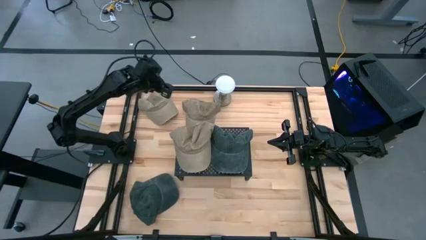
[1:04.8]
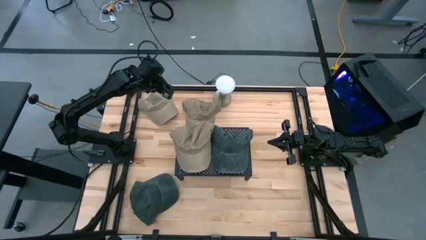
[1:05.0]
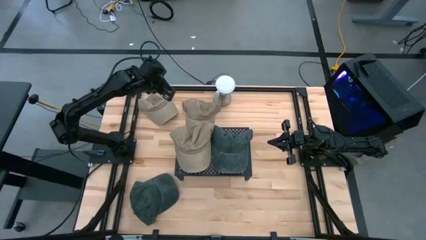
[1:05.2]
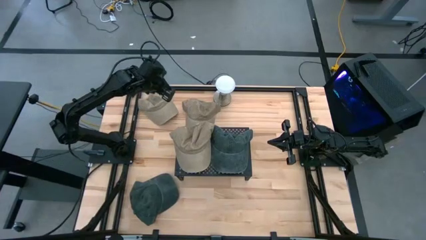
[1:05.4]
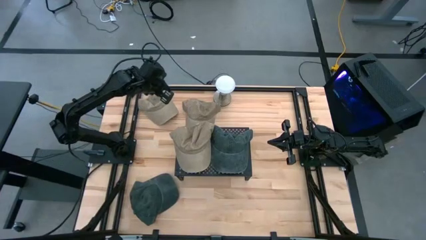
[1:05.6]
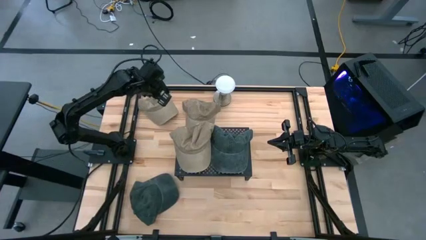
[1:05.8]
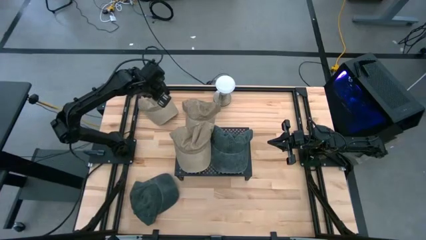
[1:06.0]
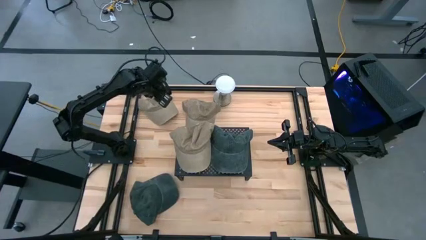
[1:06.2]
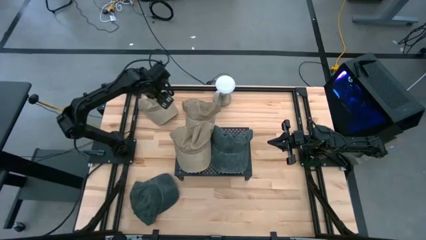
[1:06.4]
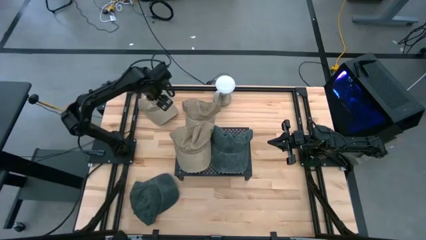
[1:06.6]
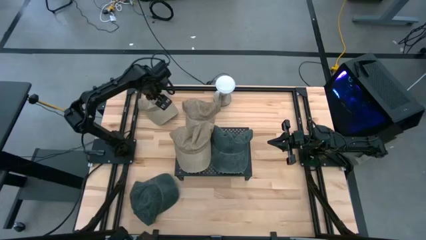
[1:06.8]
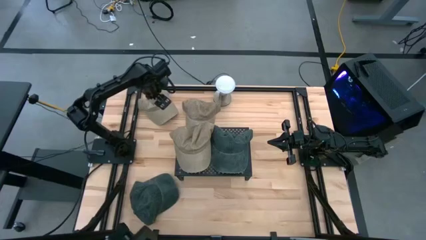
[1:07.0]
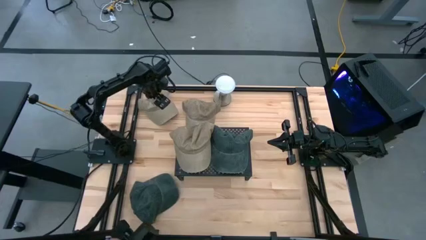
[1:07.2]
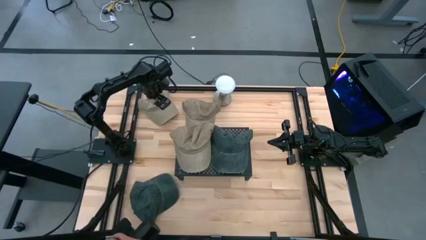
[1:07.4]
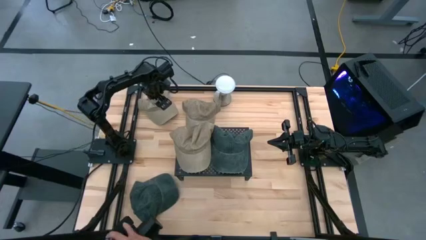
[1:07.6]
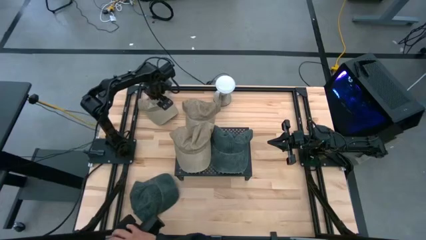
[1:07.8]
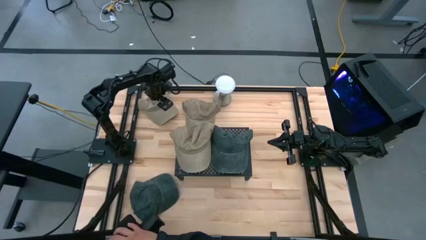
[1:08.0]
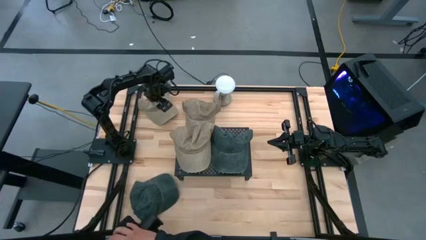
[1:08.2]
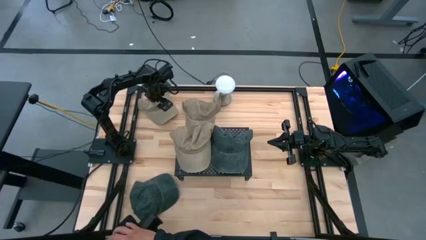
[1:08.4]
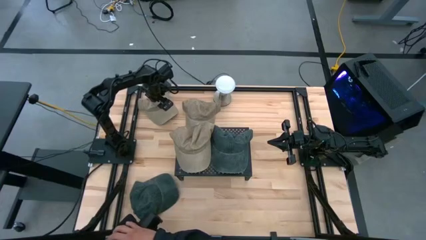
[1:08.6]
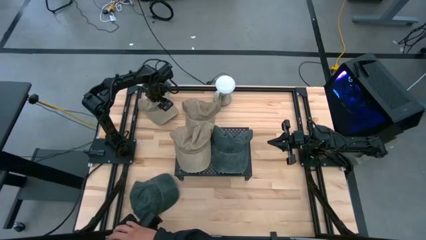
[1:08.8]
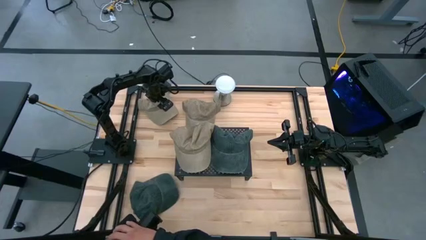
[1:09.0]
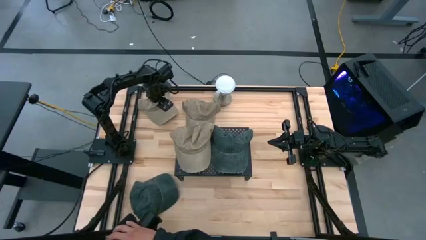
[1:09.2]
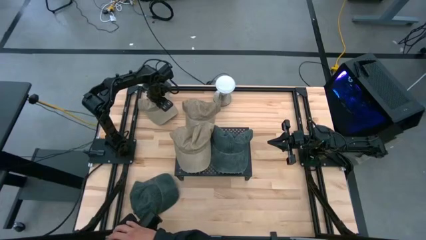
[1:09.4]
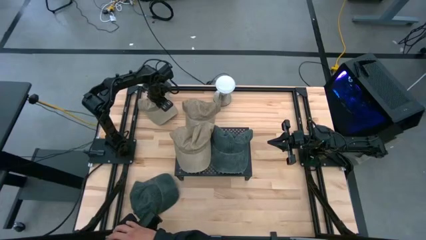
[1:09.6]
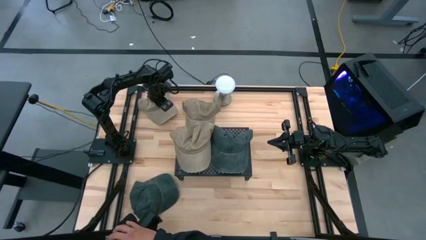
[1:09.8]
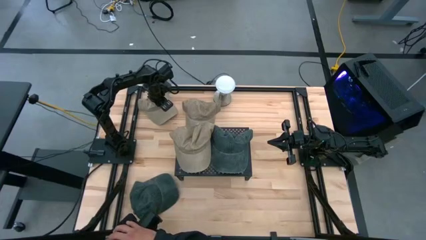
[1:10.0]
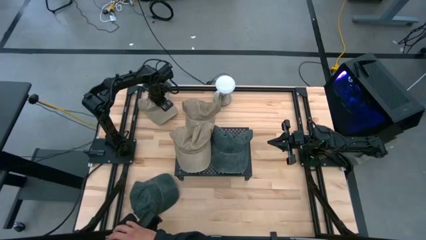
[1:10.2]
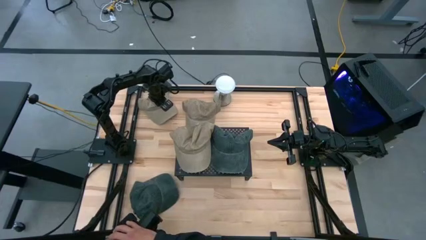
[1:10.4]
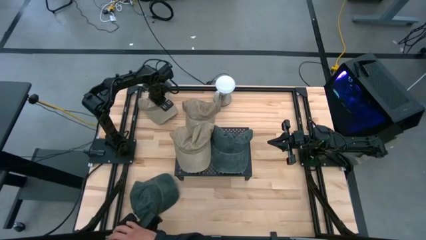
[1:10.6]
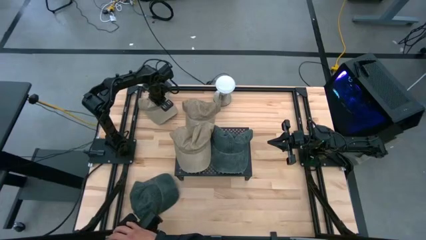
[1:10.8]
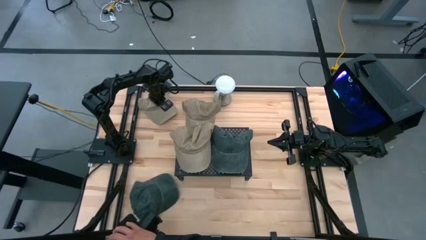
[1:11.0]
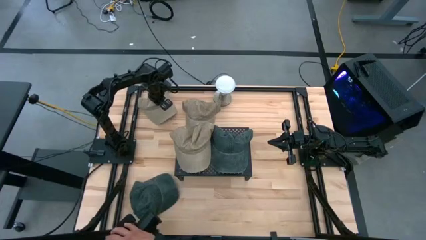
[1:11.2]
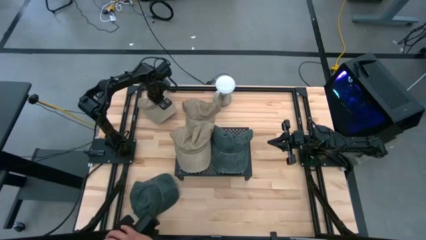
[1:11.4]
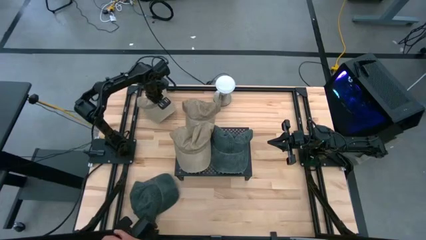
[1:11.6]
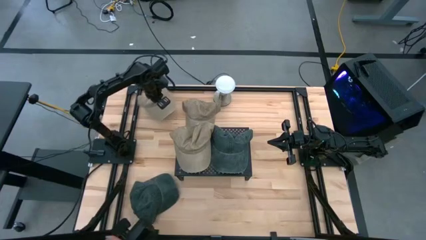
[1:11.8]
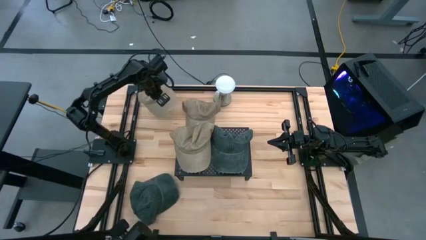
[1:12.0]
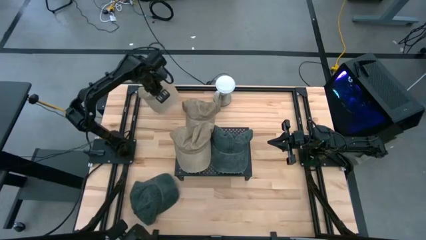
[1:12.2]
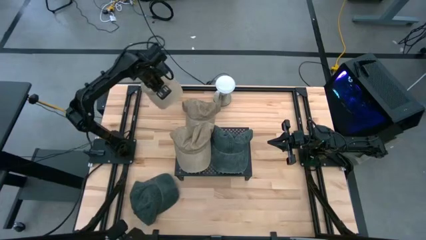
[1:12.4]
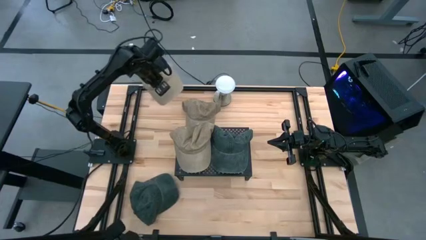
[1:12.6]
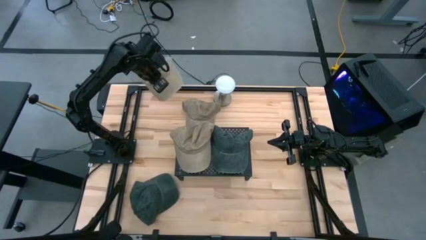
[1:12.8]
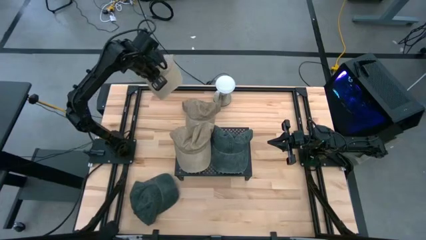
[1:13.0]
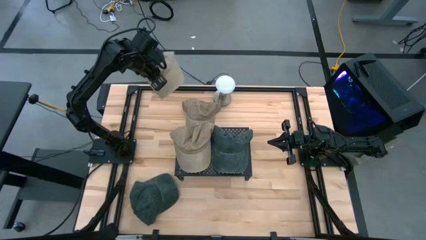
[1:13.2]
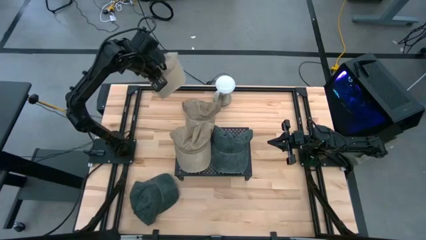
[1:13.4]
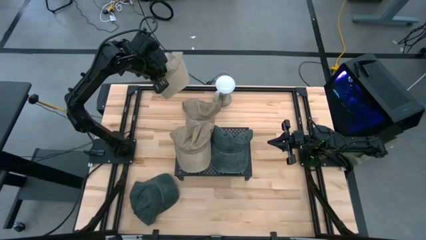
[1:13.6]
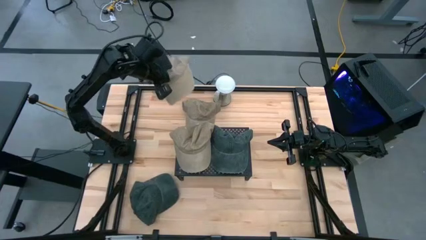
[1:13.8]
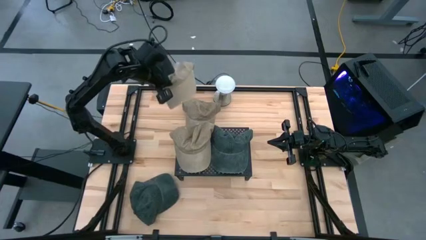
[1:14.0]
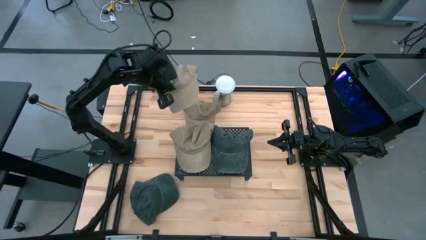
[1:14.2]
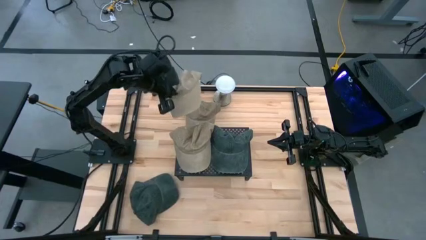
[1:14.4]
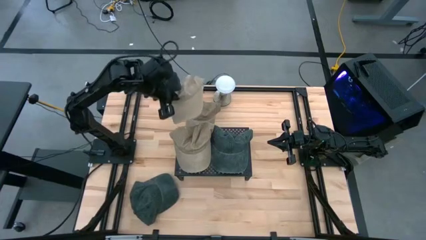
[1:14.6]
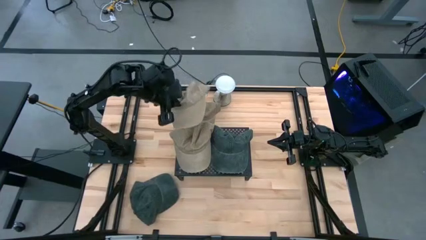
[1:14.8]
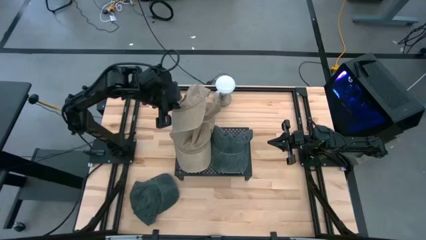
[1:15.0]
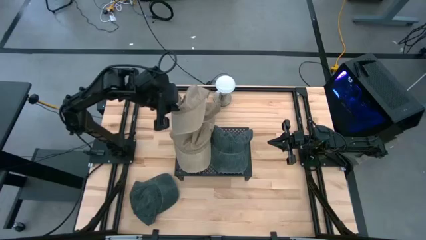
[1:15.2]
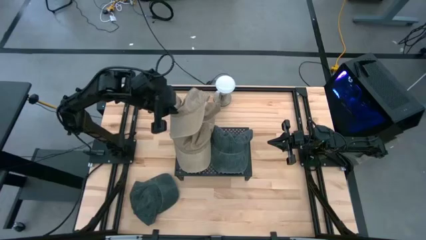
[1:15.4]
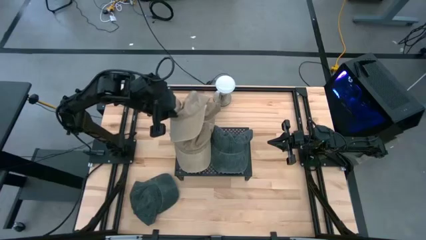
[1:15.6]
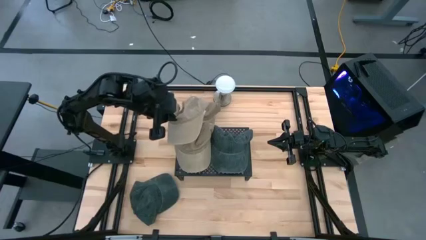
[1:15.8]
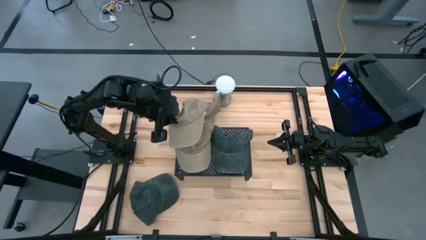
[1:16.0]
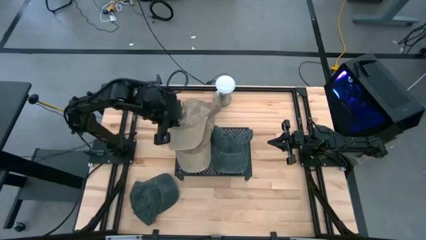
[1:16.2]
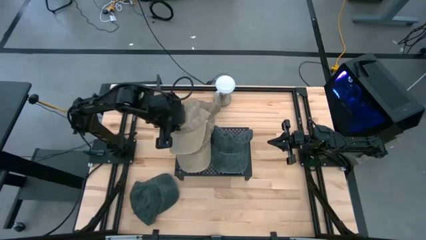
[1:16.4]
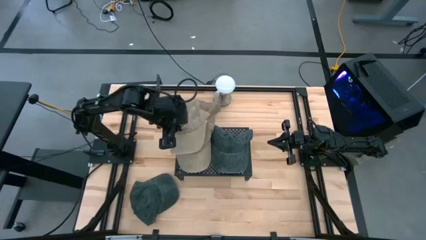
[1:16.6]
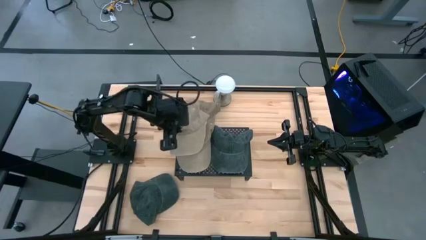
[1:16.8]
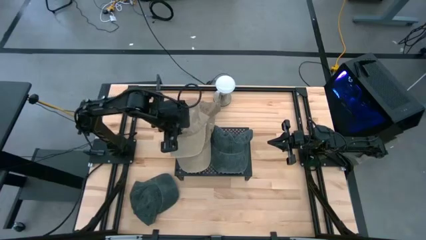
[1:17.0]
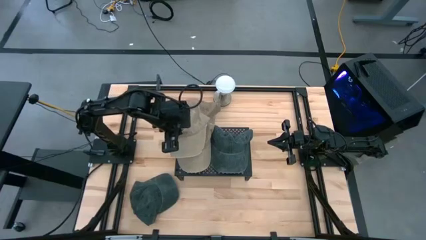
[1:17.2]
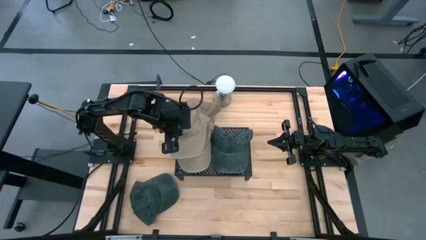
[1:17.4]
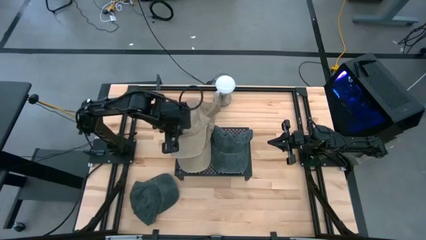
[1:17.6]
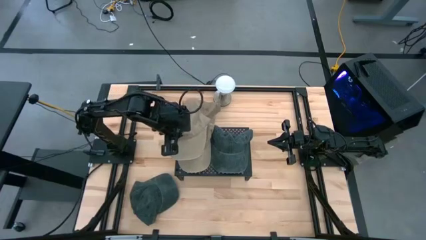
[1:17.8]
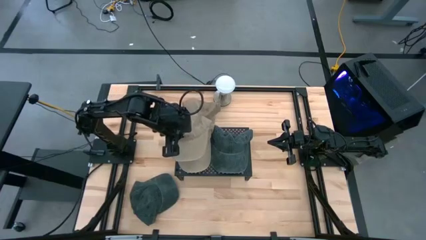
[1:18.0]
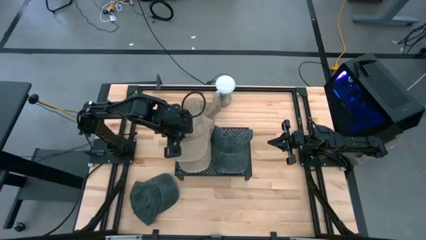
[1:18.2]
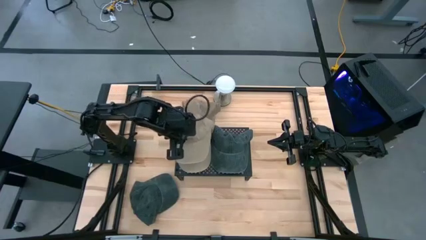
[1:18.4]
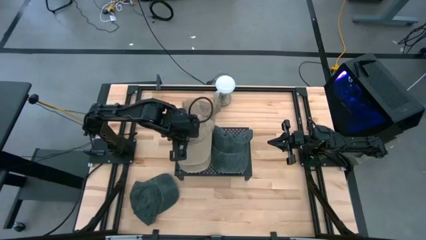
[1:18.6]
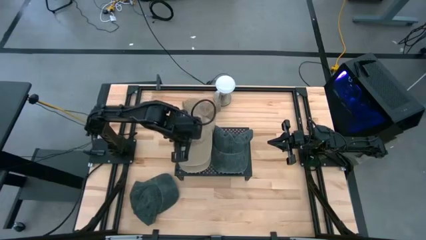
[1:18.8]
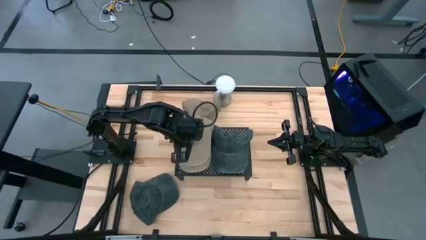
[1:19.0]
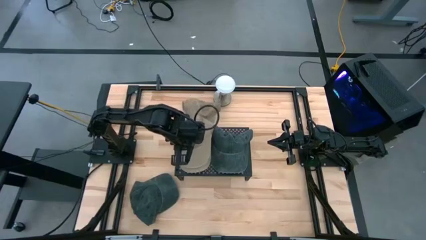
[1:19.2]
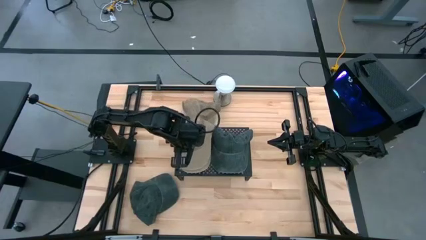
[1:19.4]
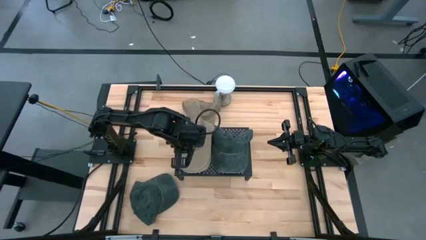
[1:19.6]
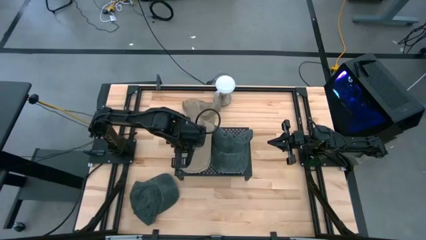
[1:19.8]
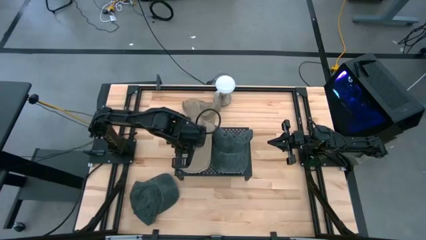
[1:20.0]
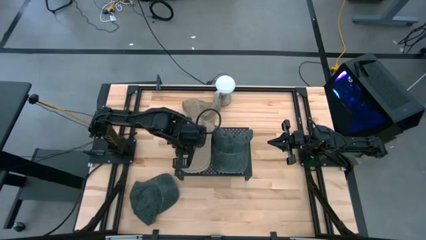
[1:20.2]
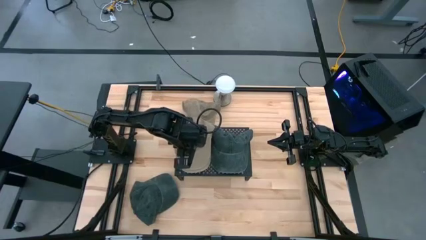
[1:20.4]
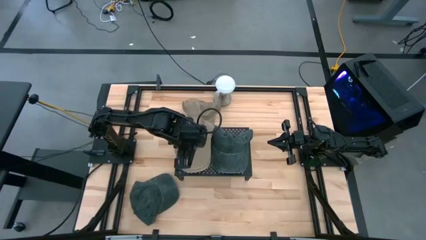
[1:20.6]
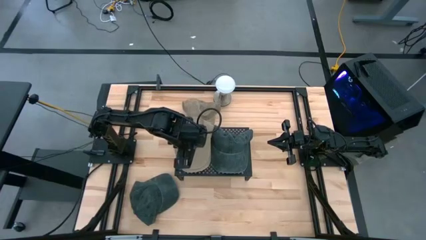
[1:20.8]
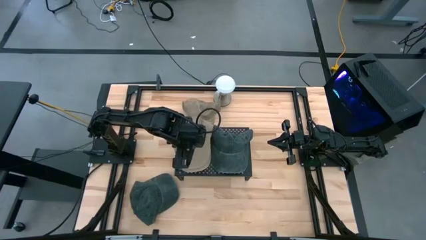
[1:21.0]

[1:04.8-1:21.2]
Task: Pick & Place hat
Stack the left brown cap on the brown cap on the shelf
